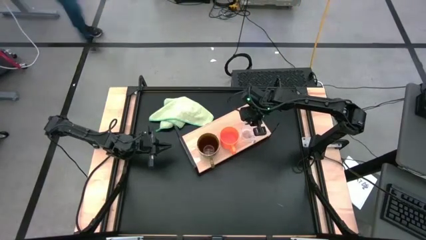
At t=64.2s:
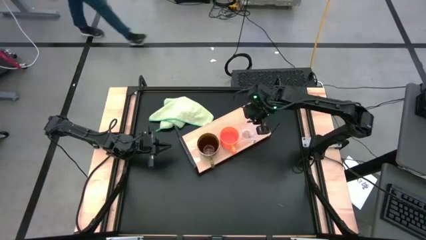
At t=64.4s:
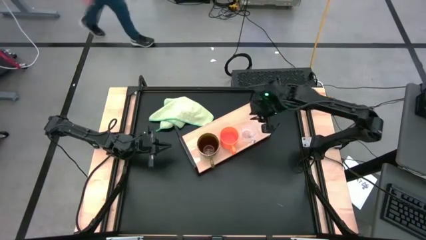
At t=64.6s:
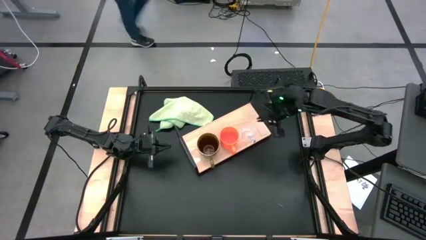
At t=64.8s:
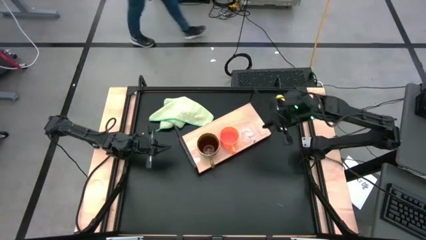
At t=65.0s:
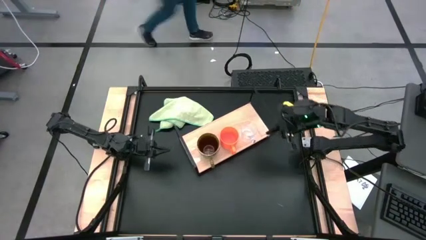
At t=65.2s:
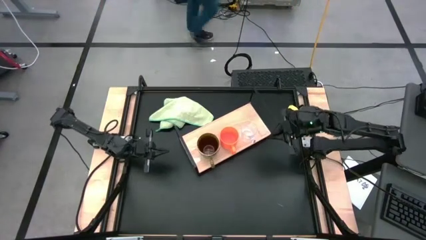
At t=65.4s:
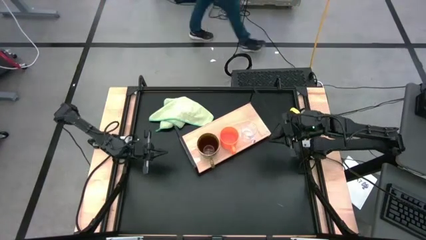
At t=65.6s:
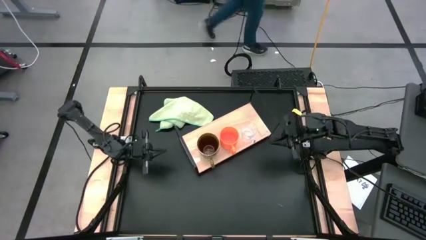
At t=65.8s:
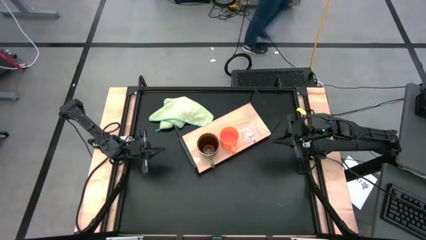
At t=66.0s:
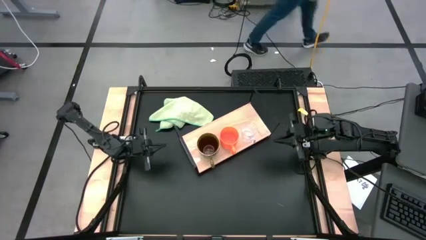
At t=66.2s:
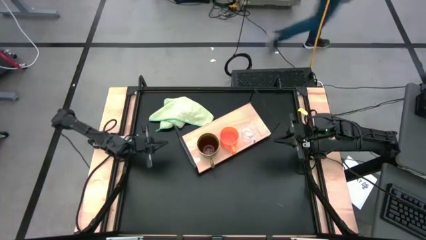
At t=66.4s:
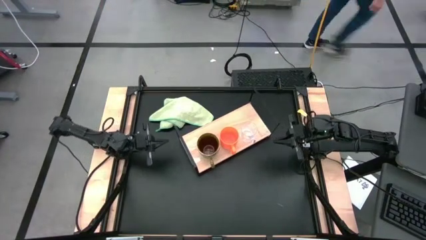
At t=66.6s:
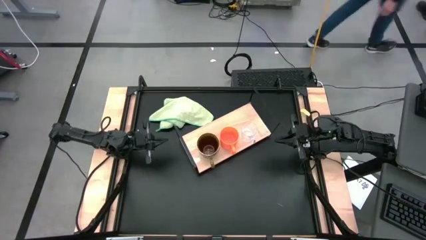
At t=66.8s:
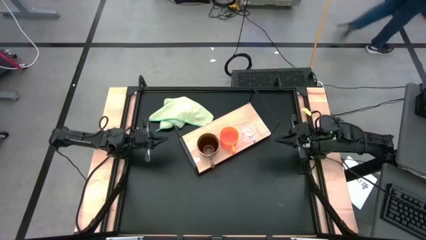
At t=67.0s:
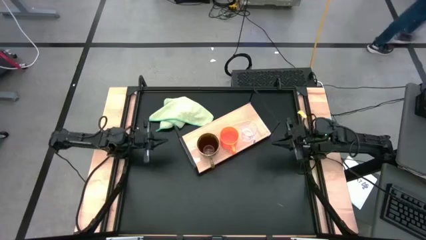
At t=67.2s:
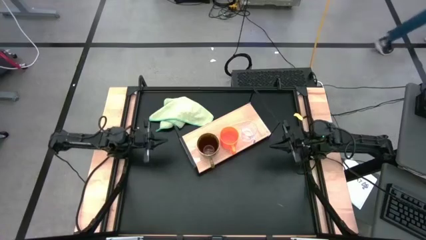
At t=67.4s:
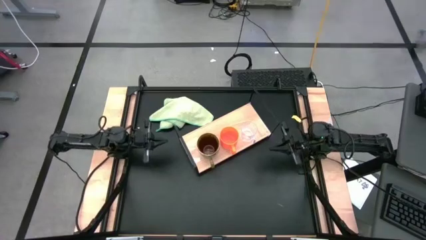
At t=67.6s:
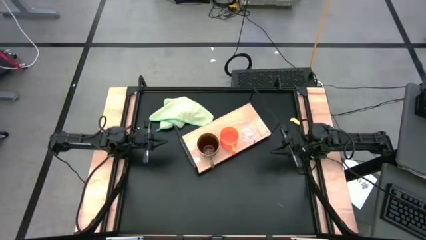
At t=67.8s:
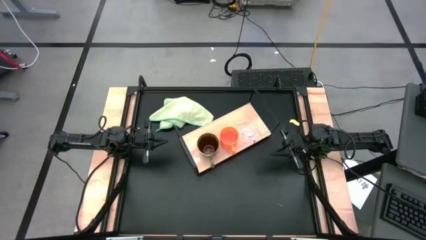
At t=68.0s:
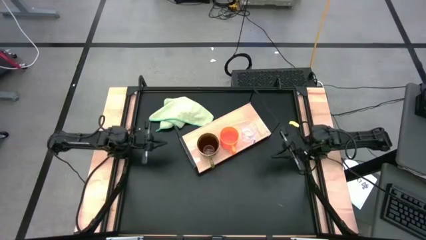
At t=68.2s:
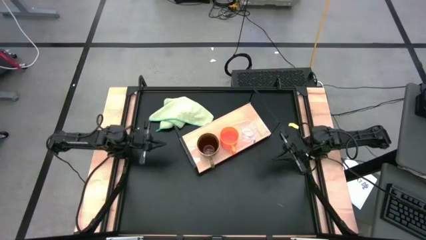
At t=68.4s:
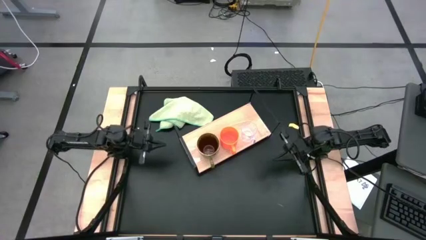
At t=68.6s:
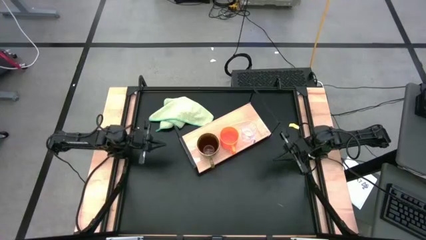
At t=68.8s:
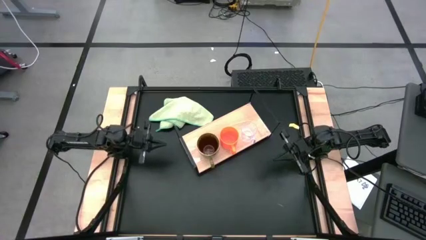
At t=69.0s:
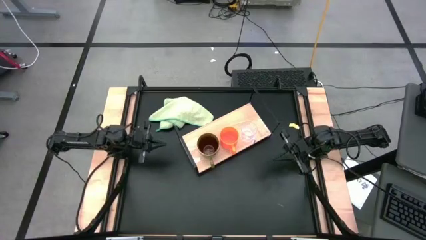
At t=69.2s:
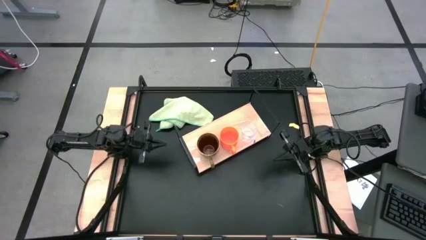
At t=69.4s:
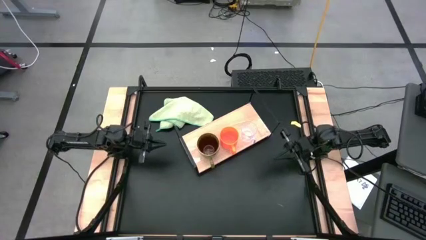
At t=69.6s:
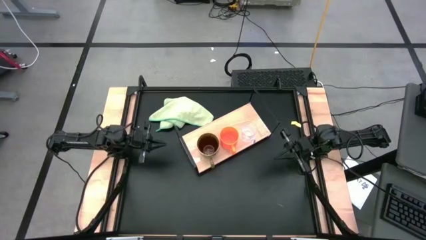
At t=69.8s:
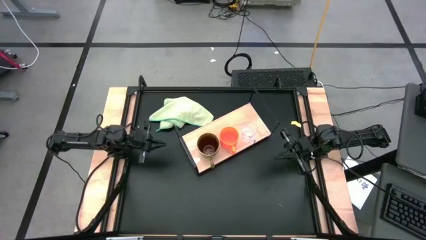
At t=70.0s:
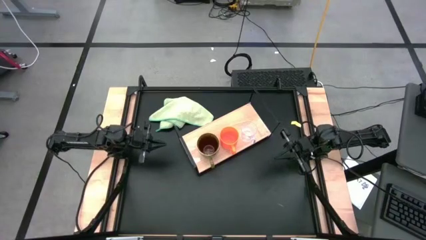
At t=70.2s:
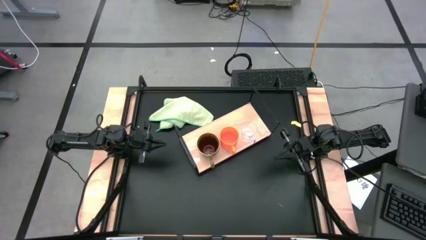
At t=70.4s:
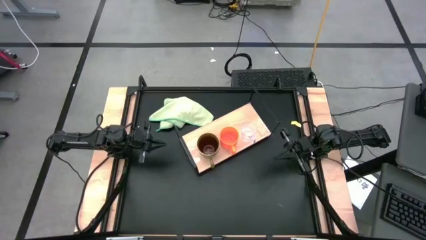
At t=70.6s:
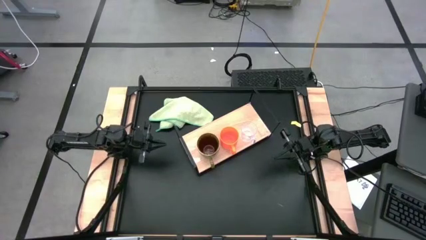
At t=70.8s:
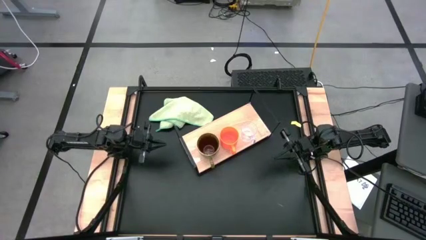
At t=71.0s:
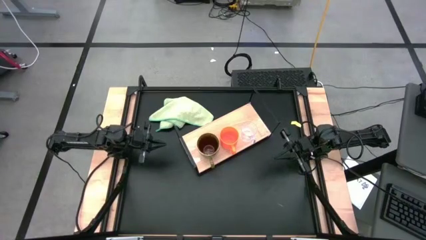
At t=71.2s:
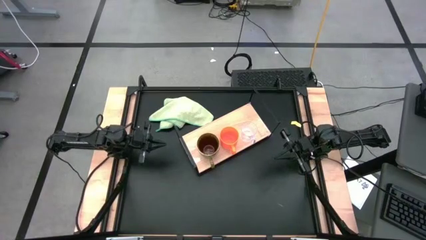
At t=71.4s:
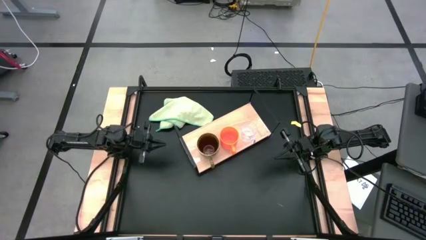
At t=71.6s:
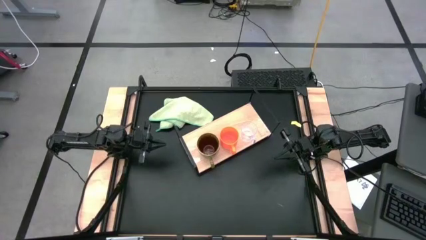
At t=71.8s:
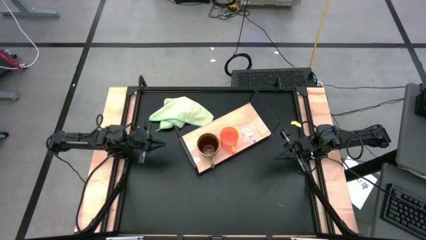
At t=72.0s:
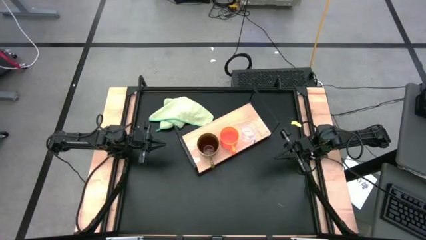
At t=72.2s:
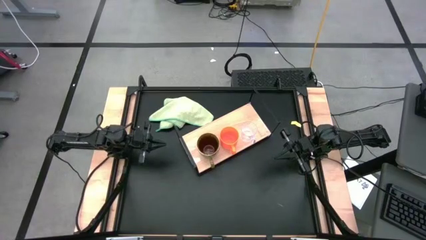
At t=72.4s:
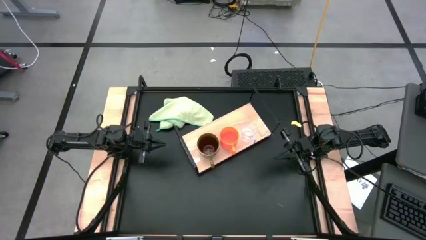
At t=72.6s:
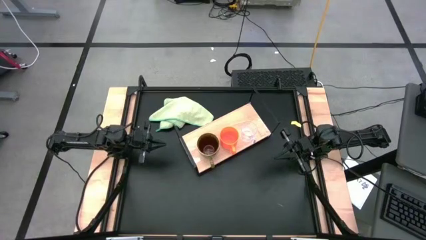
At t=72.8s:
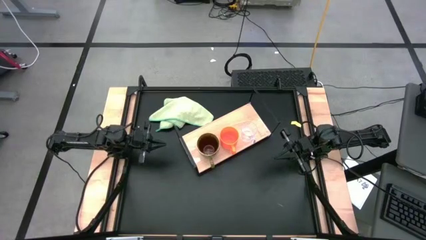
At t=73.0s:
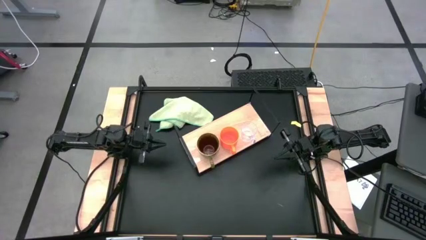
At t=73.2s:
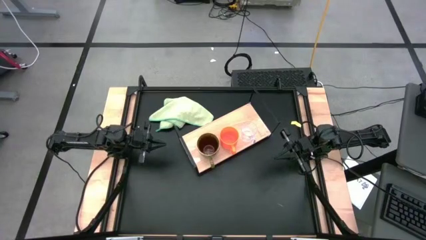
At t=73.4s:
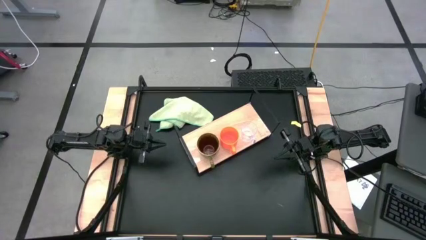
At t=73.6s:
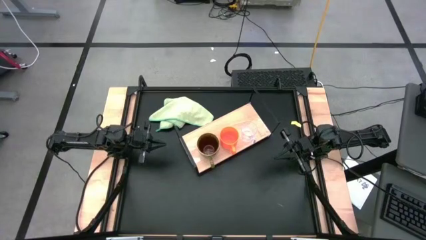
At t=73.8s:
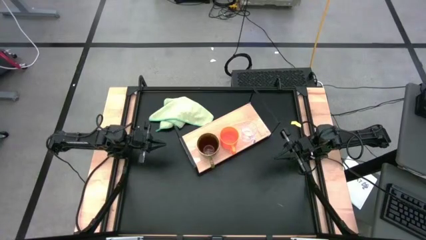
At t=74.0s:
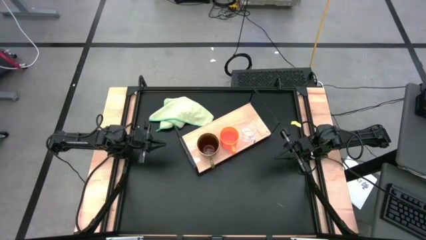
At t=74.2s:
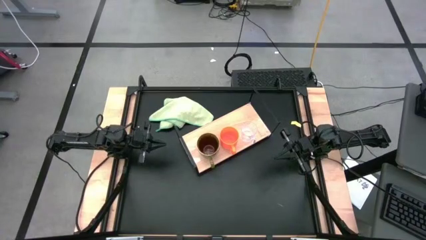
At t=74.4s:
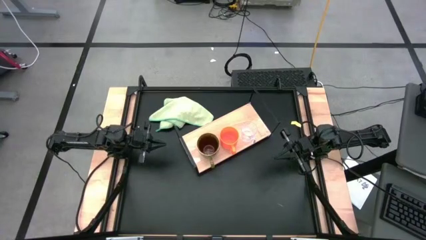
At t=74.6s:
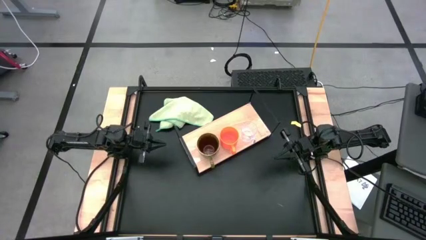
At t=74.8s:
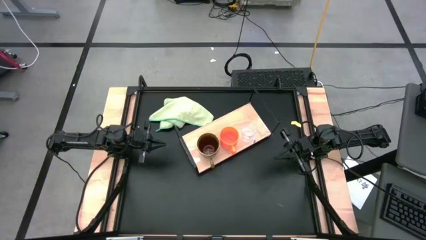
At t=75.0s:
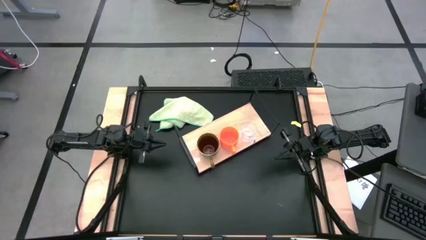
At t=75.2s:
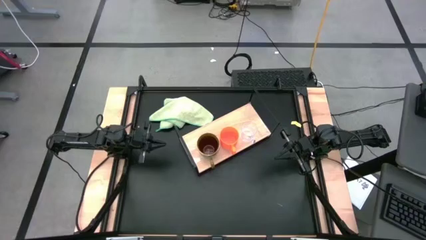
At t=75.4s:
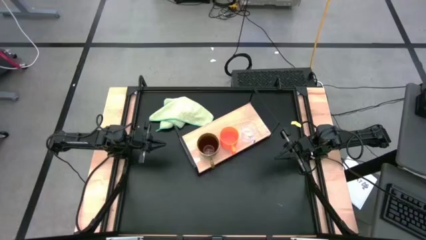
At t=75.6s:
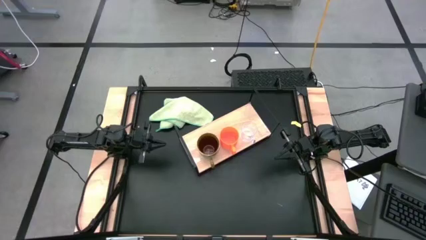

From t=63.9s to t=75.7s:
Task: Stack small to large cups/mugs on shelf
Return to Home Position
